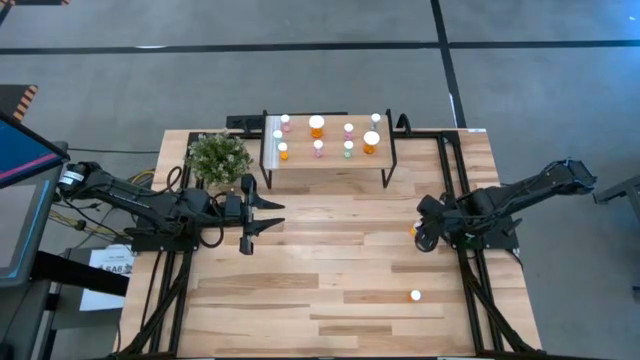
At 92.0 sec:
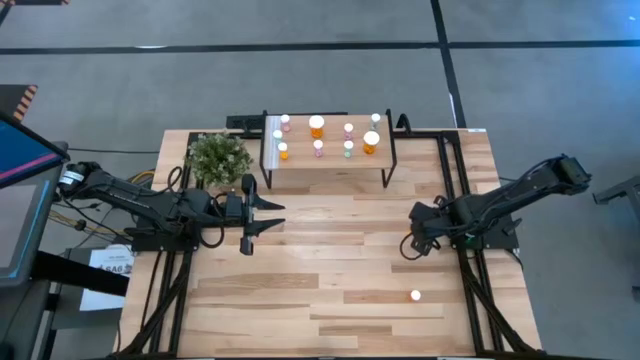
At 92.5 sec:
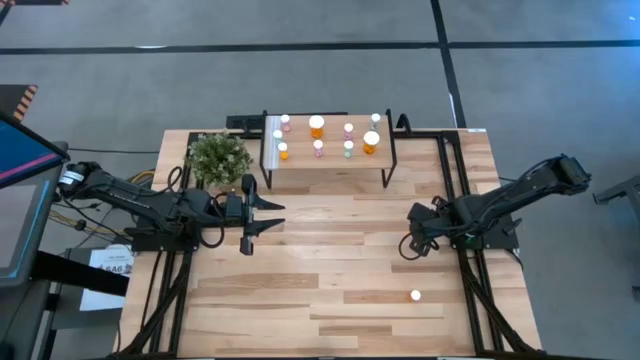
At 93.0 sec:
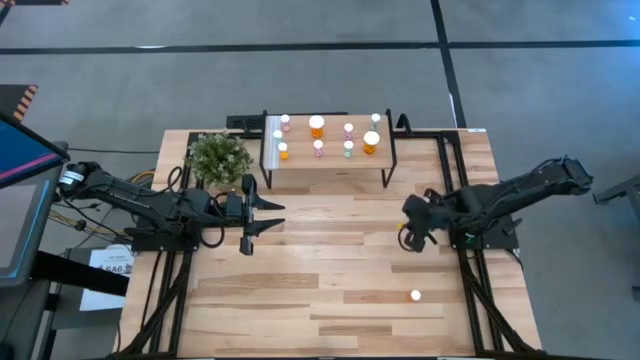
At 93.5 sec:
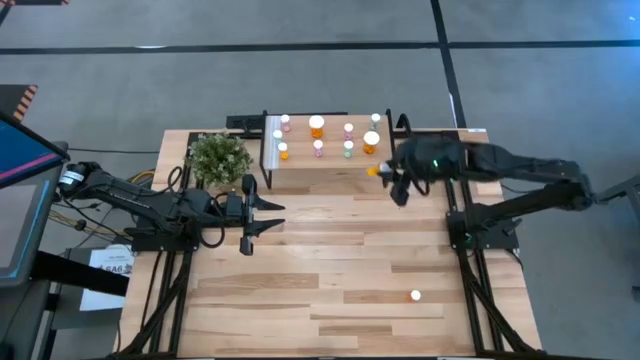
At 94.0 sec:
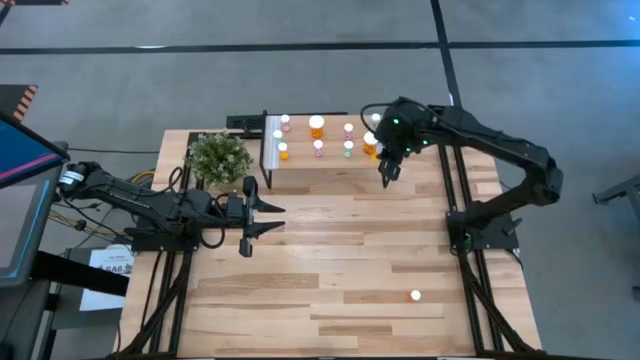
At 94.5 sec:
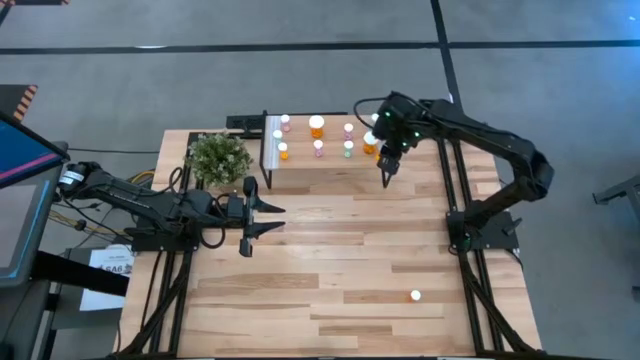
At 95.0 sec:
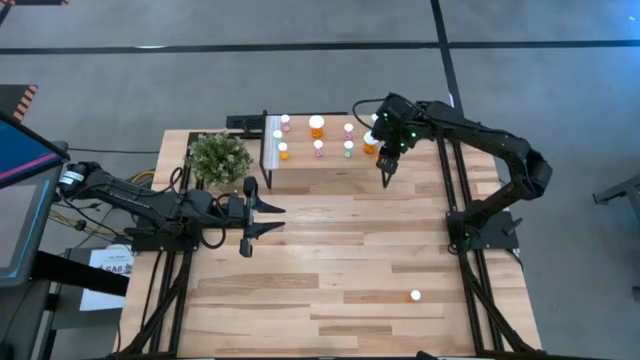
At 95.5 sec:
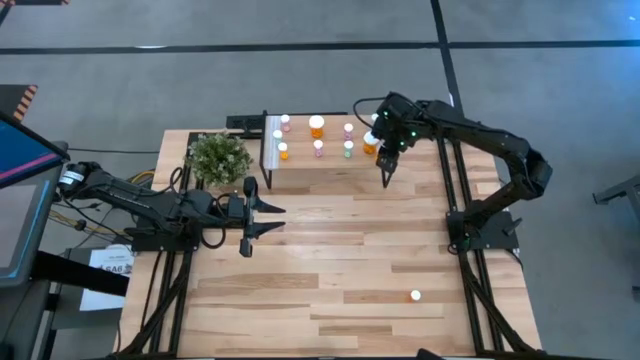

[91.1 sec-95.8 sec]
Task: Pick and place medicine bottles onto shelf by color
Put the top small orange pill bottle on the shelf

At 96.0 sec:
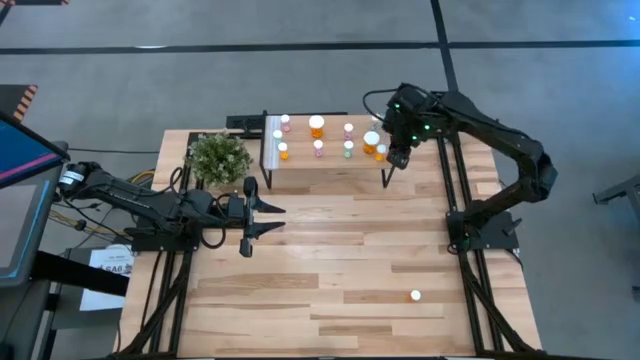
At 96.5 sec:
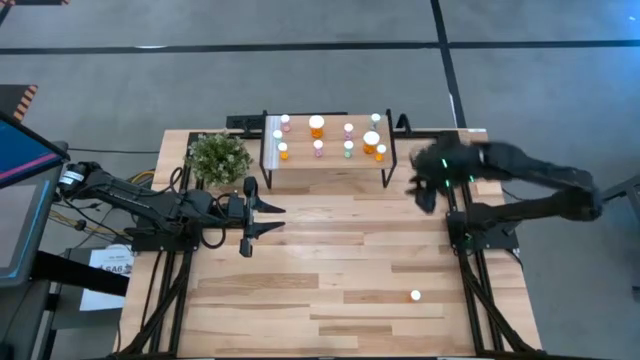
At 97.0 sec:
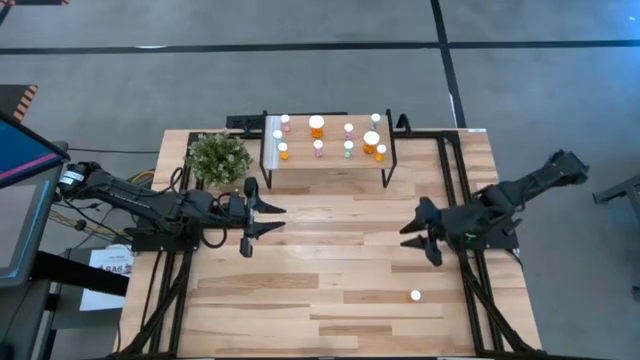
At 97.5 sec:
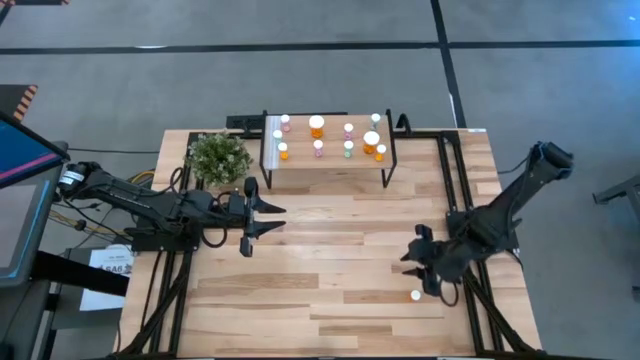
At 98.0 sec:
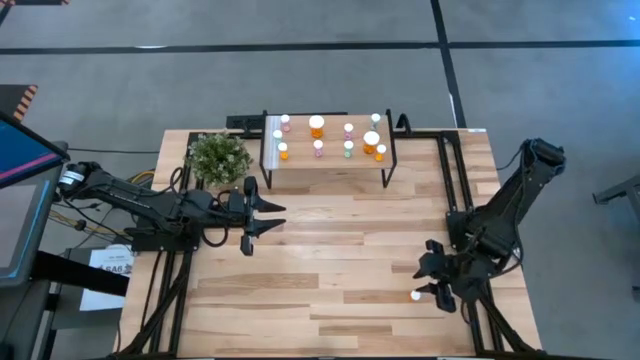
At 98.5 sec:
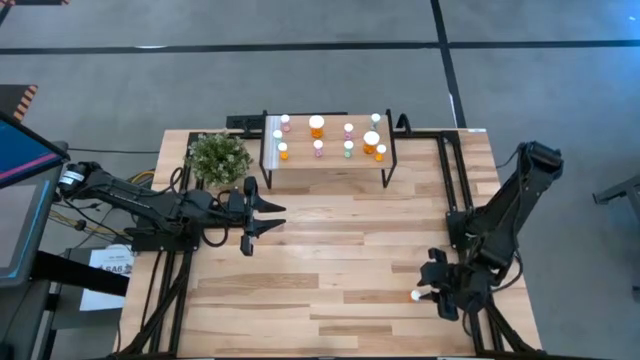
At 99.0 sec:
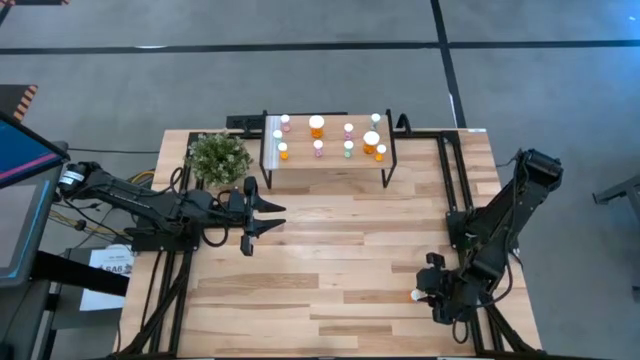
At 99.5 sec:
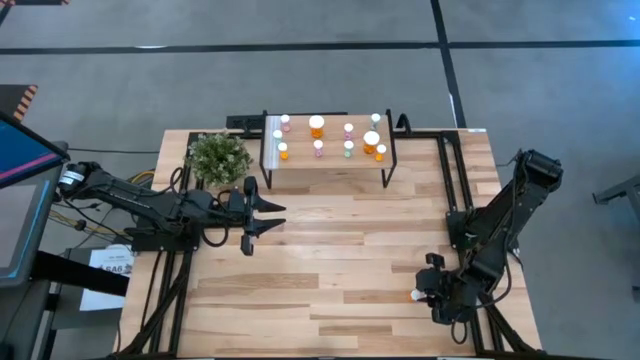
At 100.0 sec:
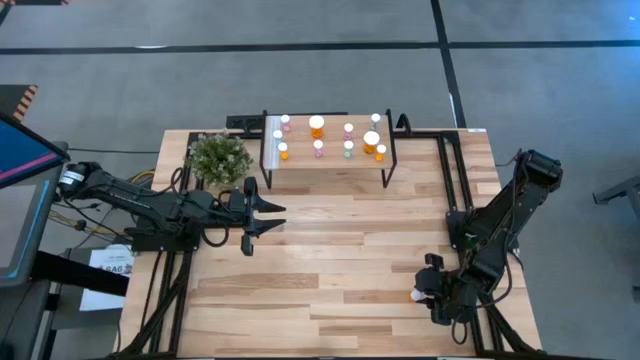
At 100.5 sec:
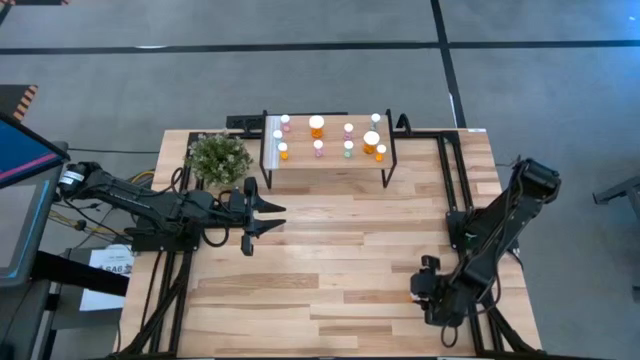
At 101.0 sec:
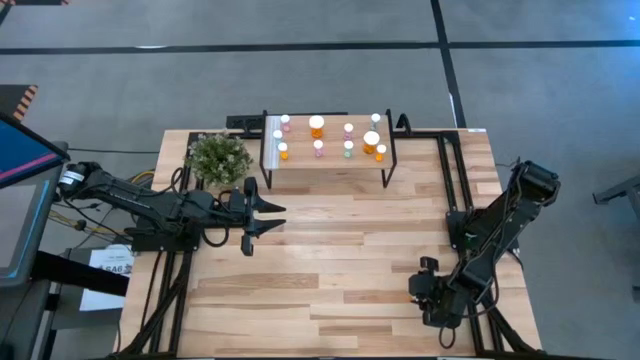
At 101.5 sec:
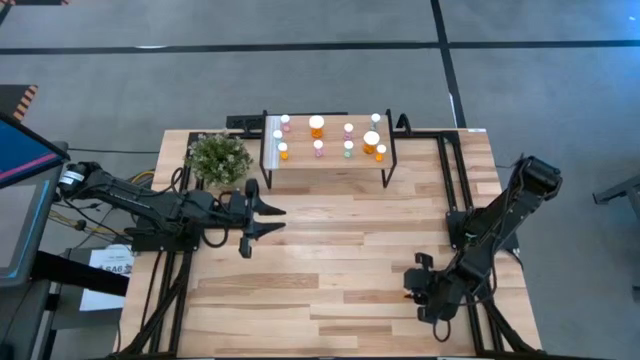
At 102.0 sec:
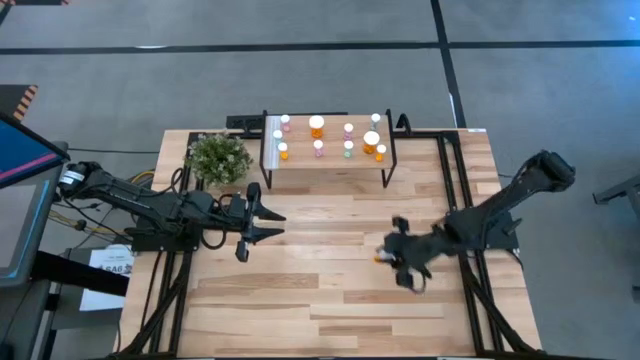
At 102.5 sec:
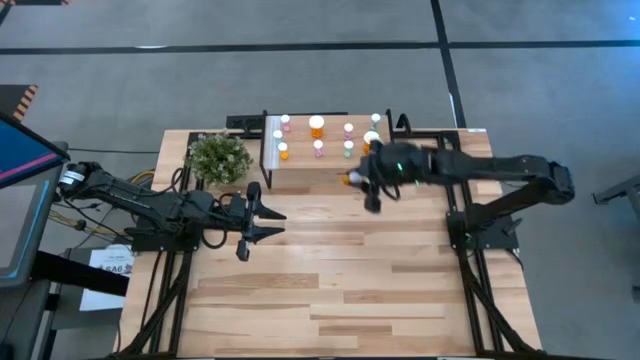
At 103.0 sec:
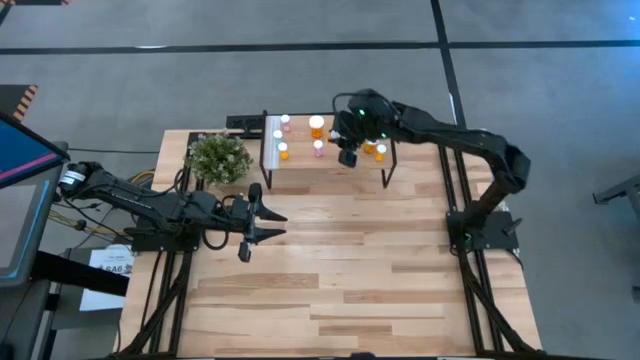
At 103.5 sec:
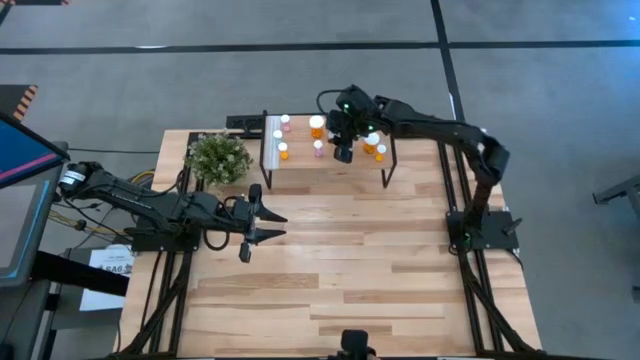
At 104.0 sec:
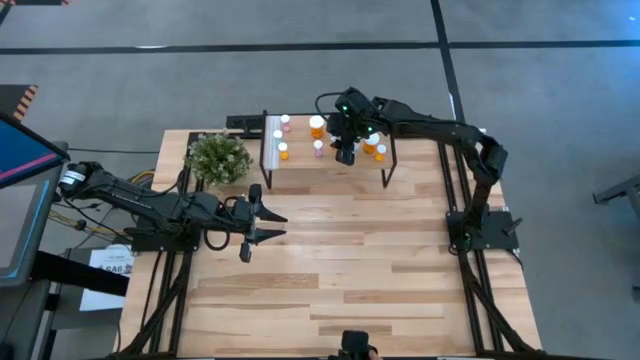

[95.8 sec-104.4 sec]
Put the small orange pill bottle on the shelf

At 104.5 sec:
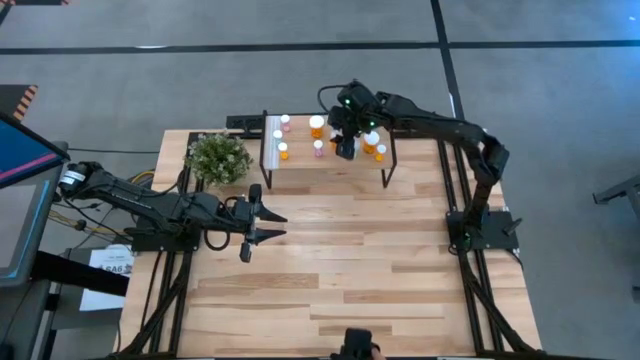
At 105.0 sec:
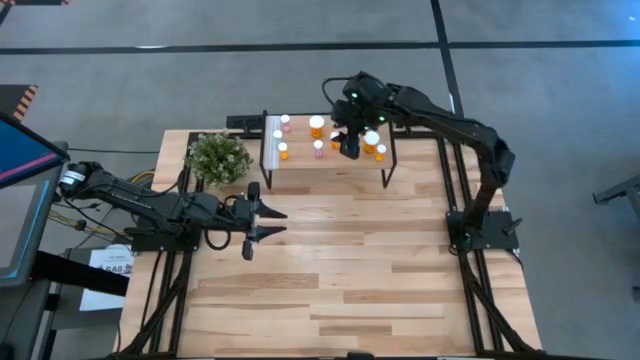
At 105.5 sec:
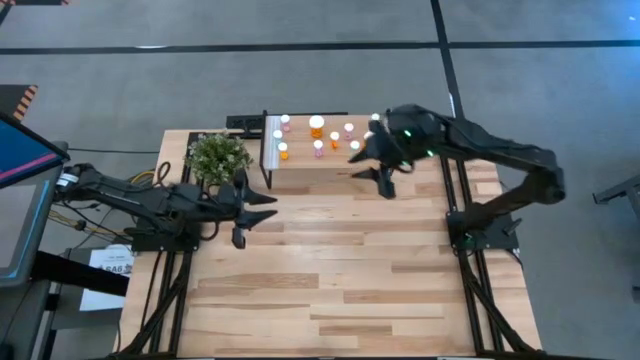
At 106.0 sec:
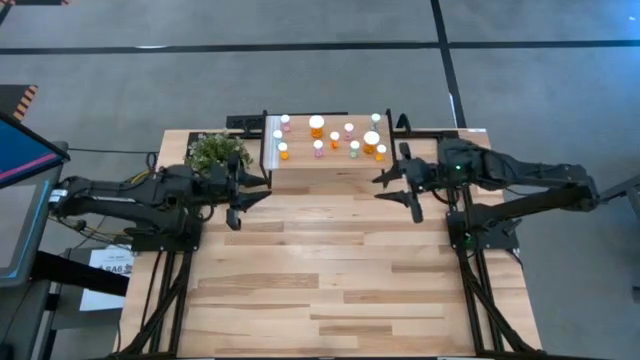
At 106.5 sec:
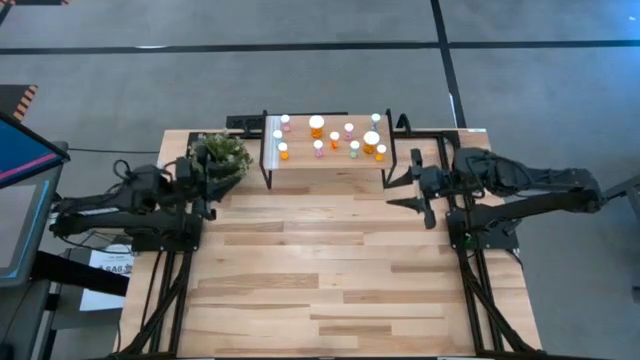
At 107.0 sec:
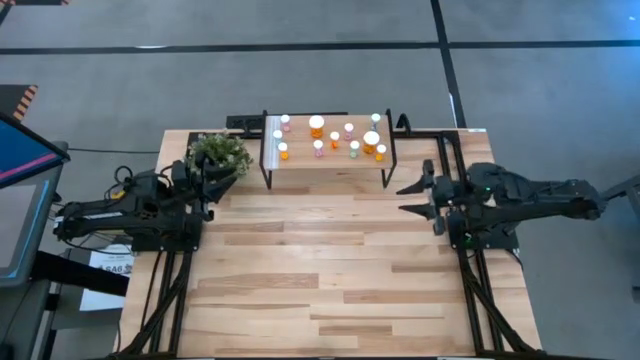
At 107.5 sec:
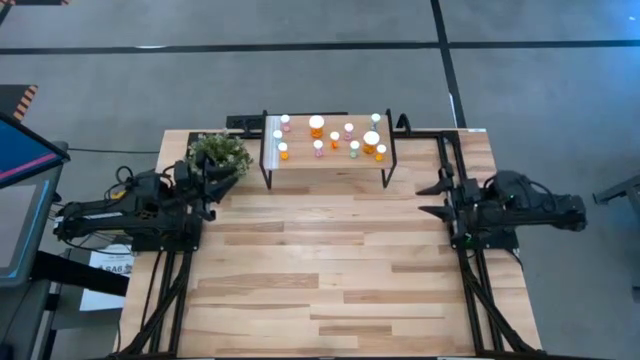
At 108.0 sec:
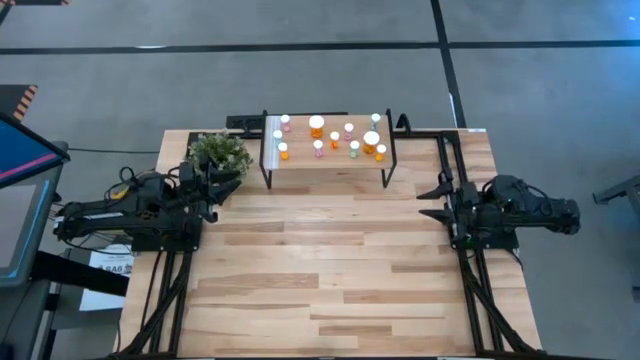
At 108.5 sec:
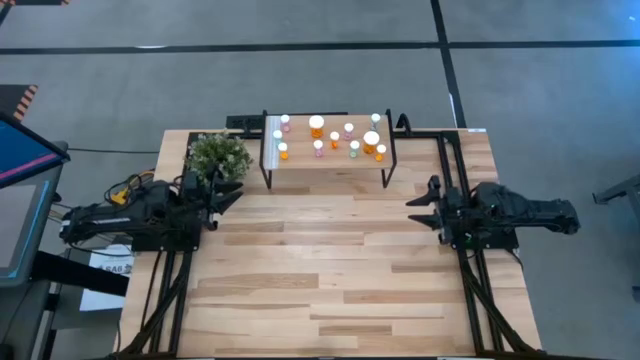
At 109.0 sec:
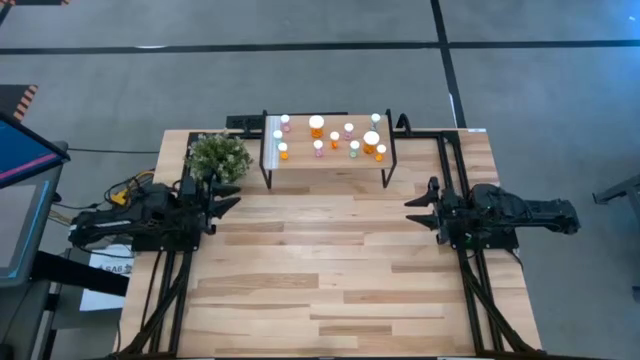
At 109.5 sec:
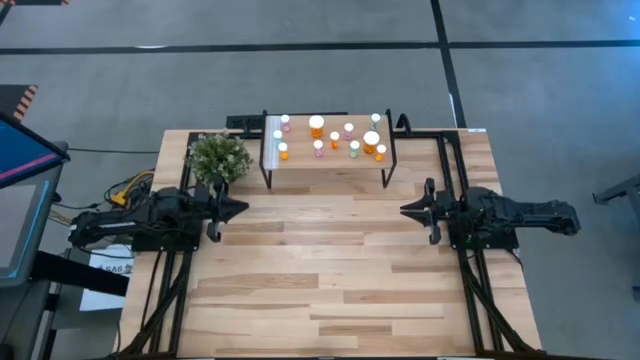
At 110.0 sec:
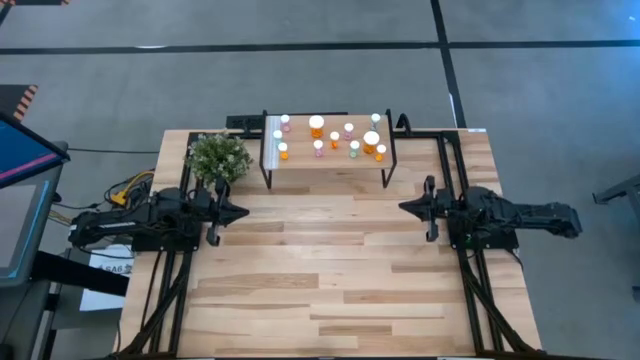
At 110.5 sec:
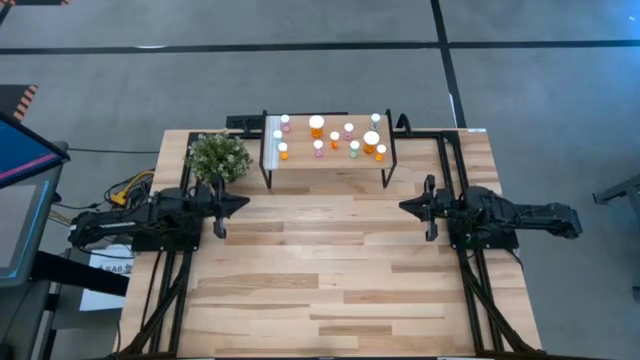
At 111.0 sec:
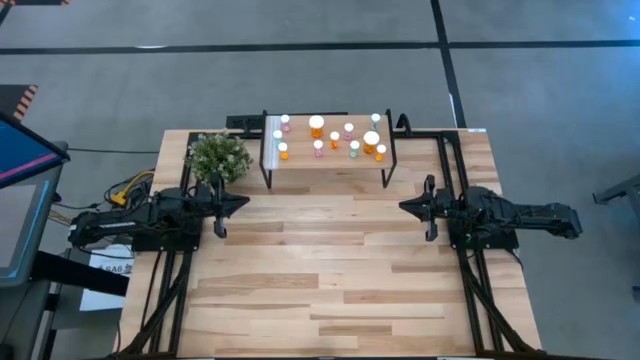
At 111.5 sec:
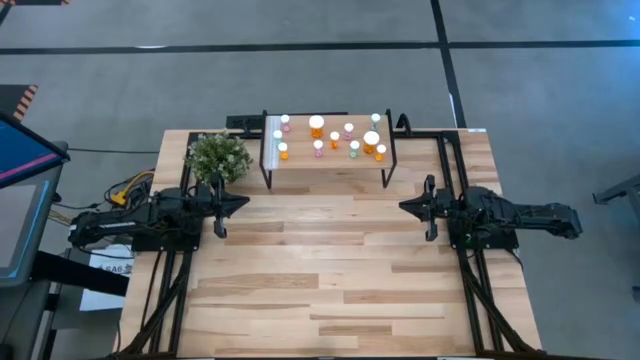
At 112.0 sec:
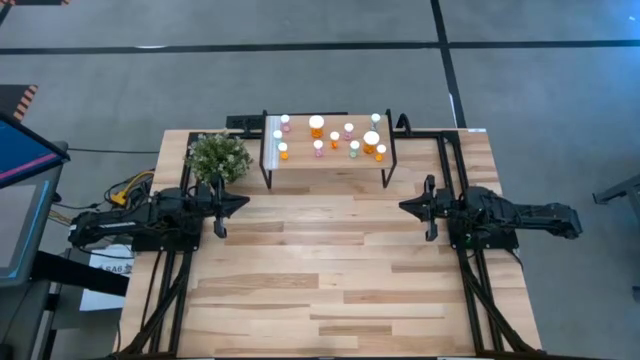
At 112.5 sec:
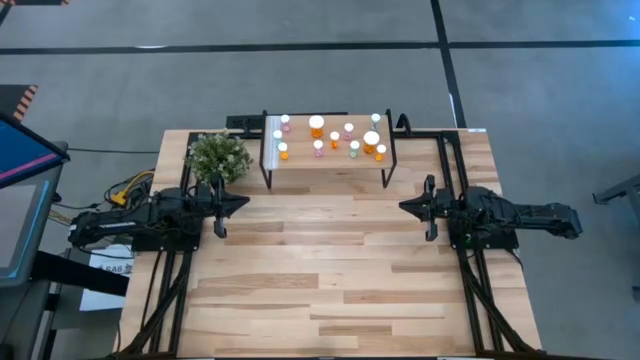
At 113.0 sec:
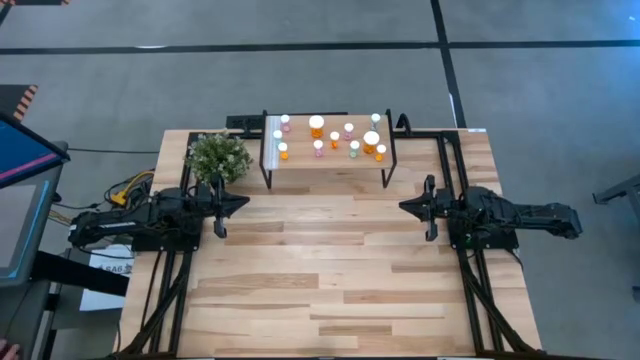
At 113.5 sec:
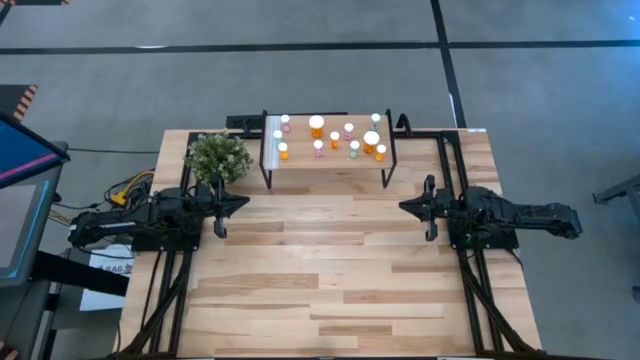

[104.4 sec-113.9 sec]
Return to Home Position
